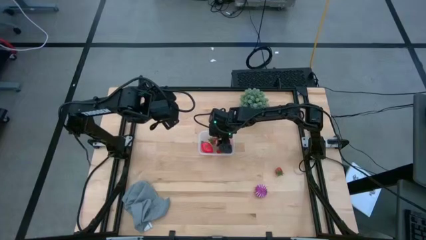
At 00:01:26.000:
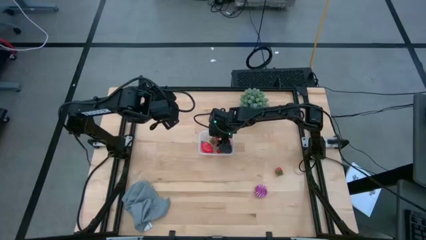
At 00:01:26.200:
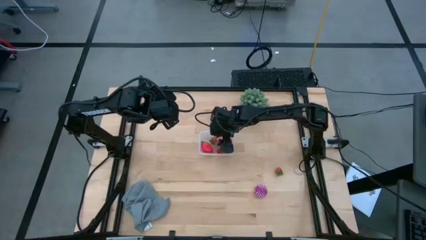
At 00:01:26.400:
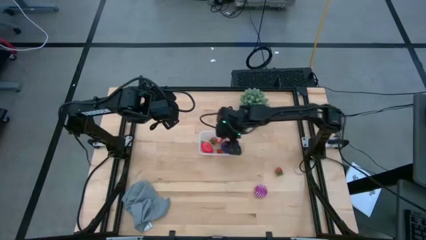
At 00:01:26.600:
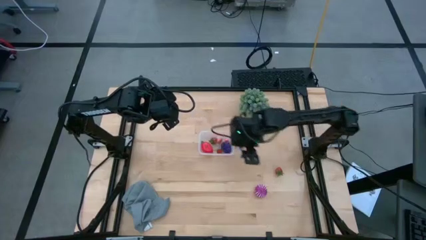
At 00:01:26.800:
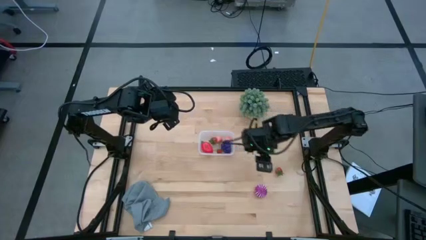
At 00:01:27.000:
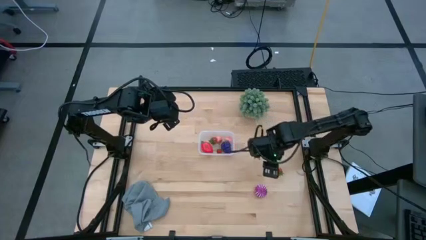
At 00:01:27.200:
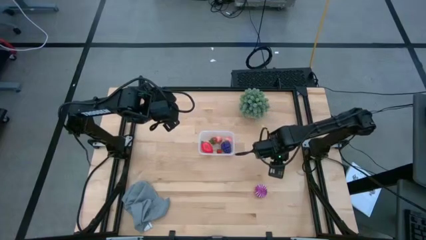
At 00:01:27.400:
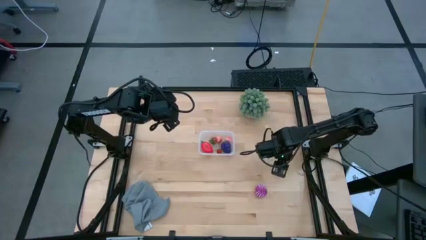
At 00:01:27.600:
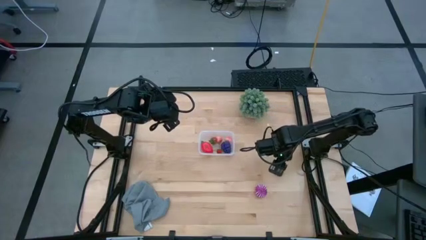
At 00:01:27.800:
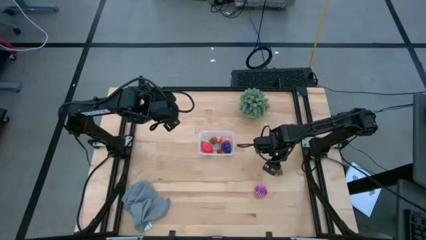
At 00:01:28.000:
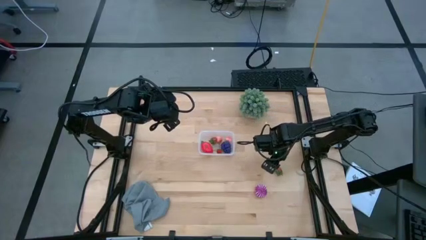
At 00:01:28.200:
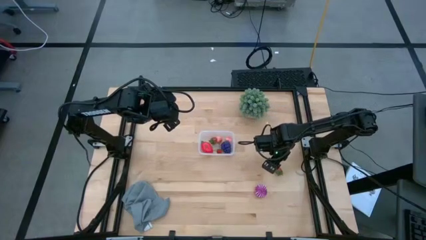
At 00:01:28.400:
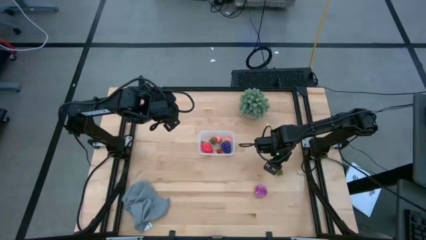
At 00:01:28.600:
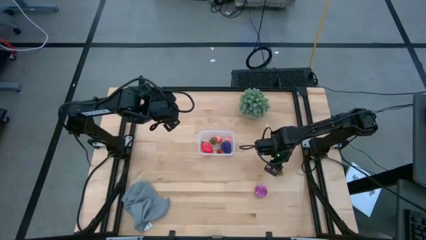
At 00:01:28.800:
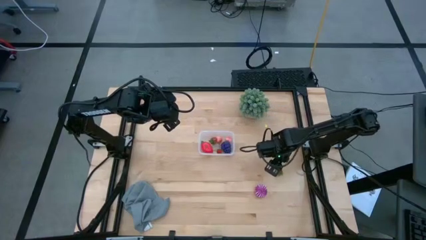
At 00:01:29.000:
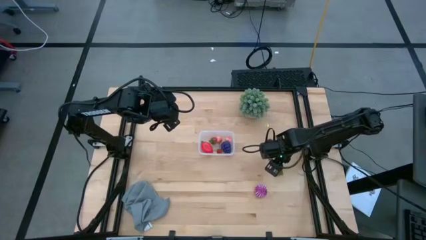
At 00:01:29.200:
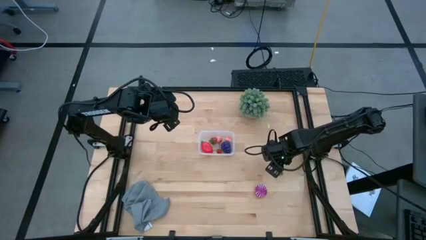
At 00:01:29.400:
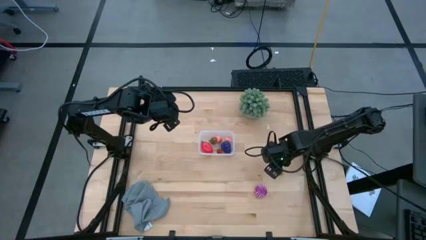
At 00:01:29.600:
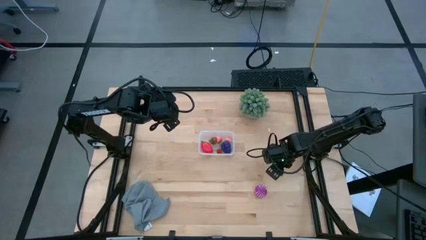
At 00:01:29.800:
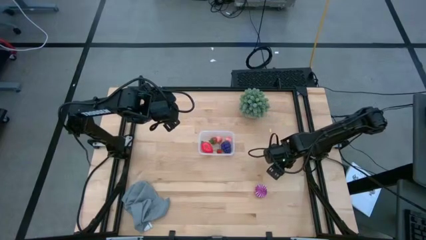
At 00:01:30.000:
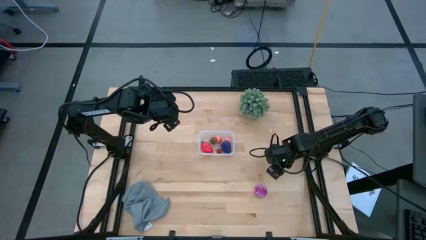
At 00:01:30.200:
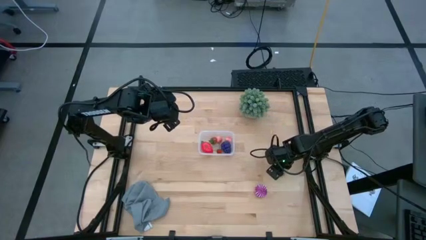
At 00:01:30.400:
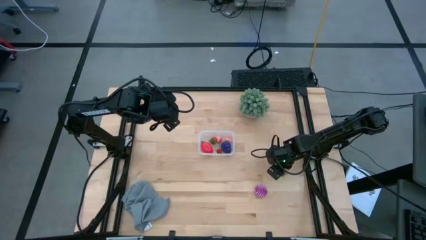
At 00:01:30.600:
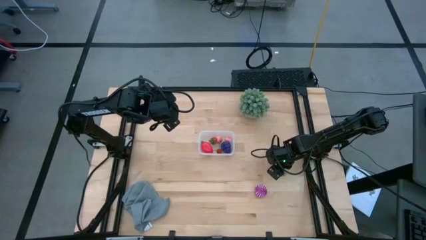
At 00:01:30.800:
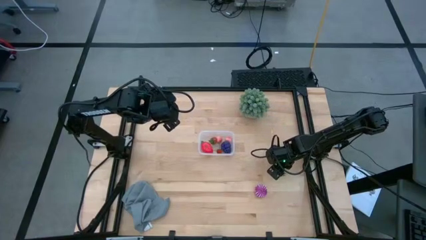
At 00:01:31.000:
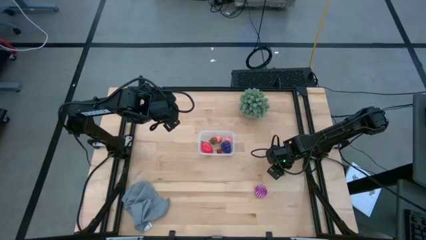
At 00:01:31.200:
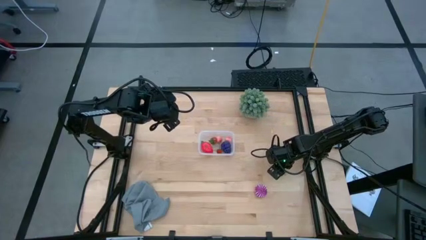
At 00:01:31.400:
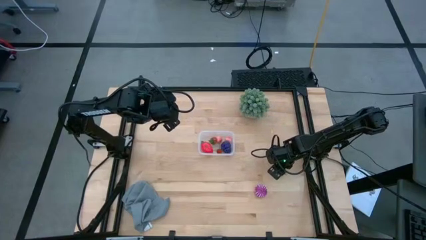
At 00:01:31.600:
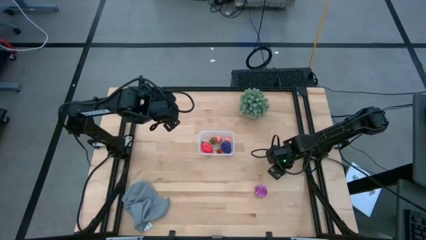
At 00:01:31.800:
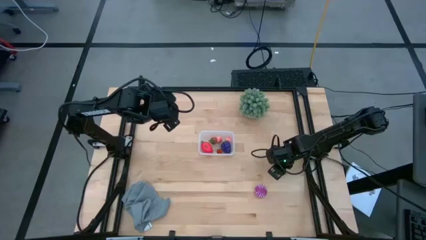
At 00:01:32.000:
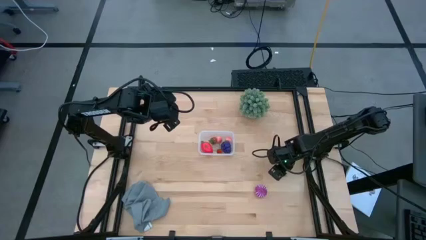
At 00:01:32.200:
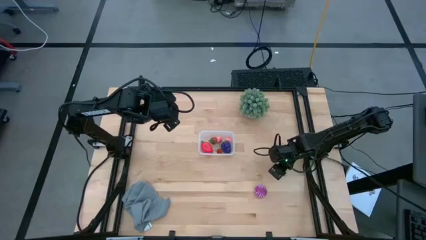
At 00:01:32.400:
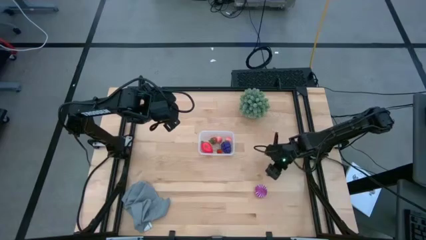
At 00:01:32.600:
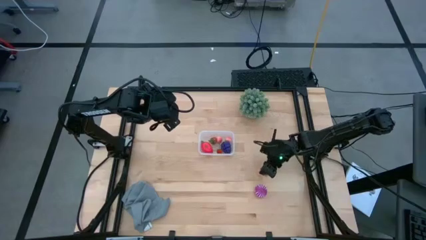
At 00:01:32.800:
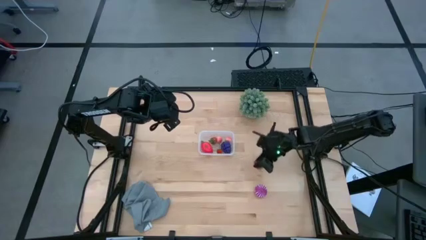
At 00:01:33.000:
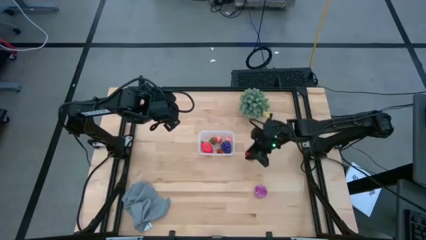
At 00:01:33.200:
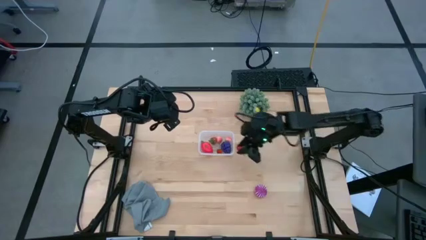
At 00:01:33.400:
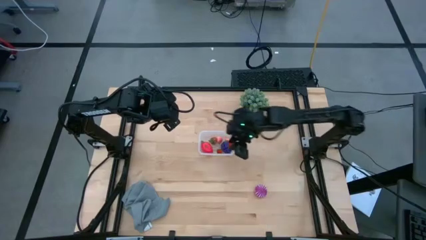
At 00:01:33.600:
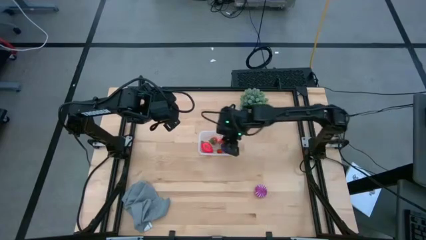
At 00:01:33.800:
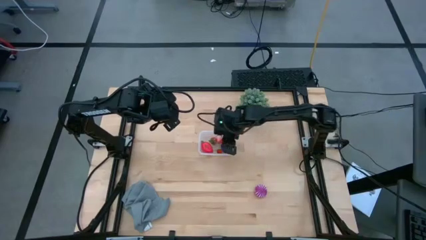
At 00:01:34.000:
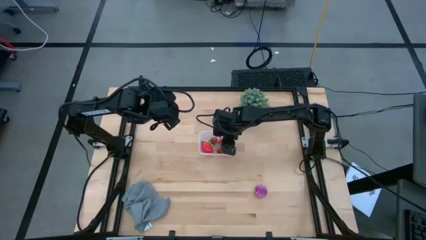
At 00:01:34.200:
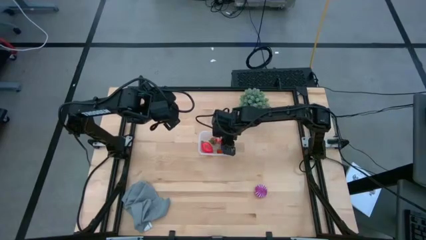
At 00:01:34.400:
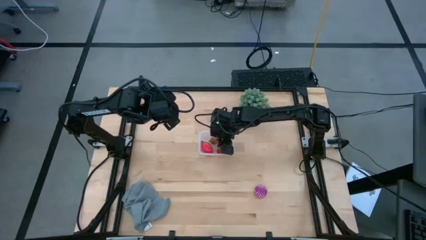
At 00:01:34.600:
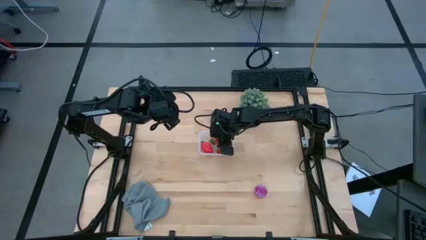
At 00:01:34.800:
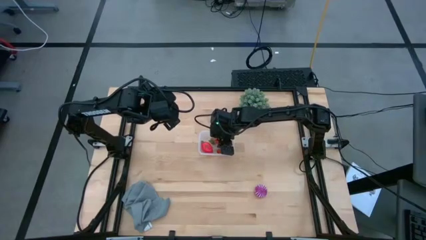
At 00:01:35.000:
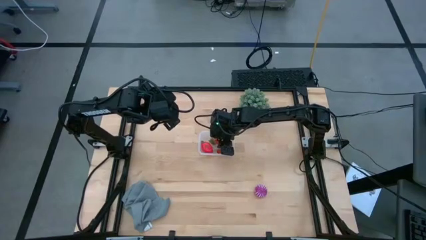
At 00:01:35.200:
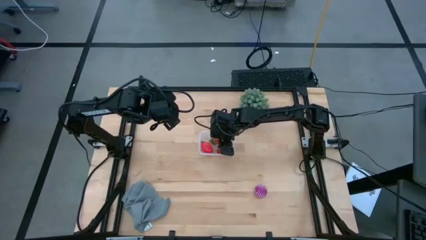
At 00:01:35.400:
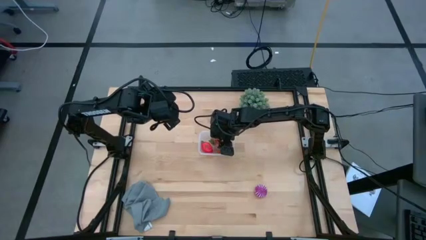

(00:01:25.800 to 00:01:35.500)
Task: Pick and placing Produce into tupperware
Put the red strawberry into the transparent bin

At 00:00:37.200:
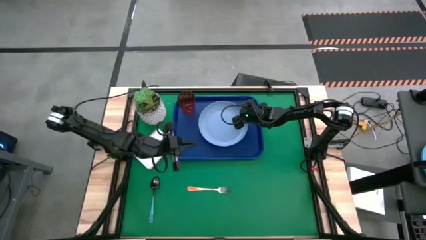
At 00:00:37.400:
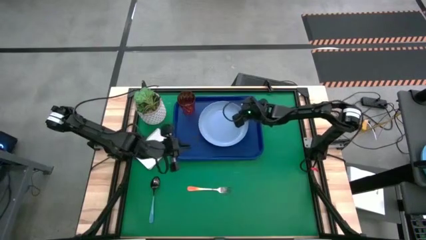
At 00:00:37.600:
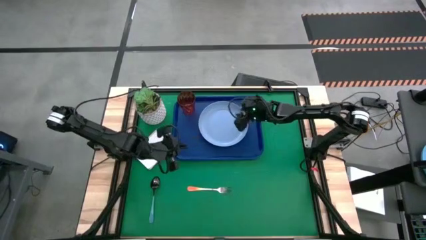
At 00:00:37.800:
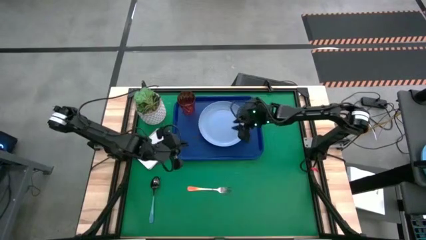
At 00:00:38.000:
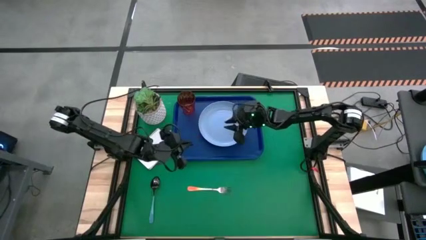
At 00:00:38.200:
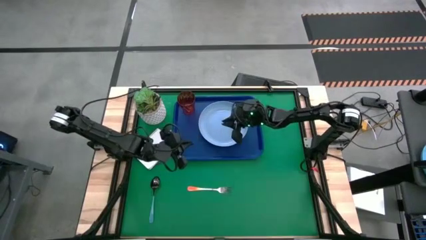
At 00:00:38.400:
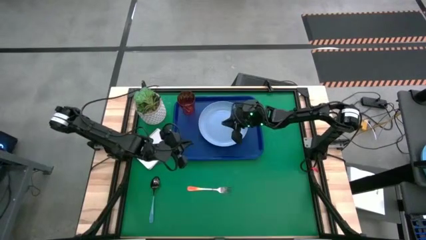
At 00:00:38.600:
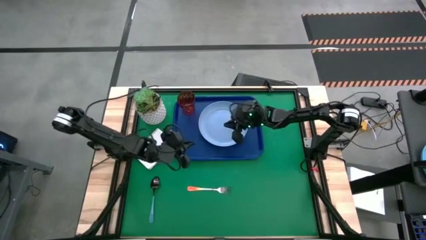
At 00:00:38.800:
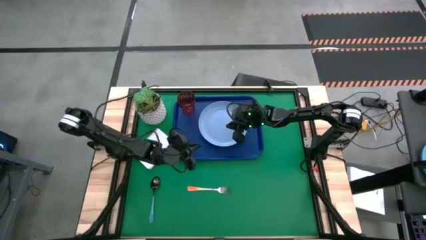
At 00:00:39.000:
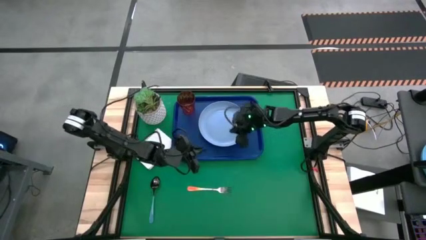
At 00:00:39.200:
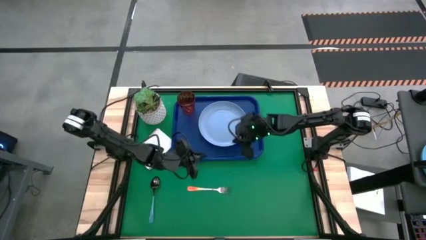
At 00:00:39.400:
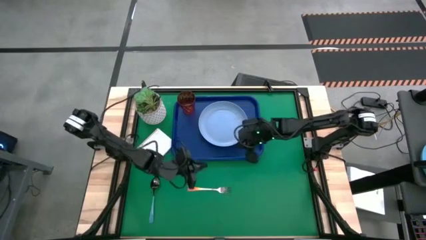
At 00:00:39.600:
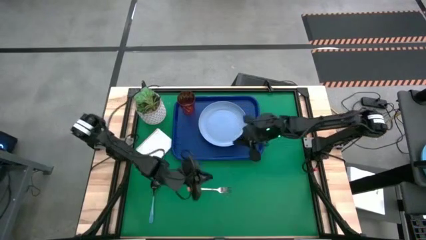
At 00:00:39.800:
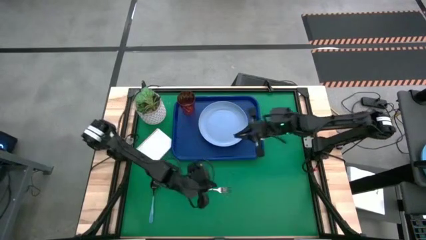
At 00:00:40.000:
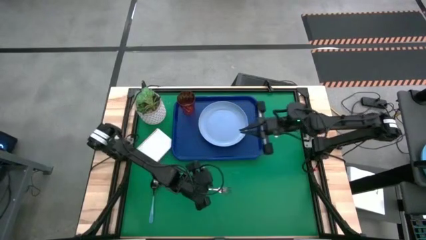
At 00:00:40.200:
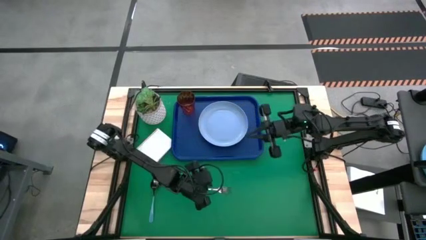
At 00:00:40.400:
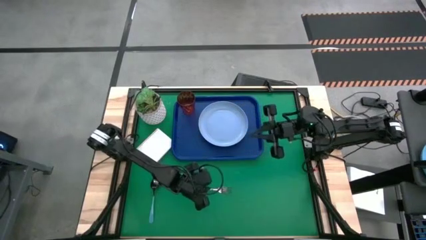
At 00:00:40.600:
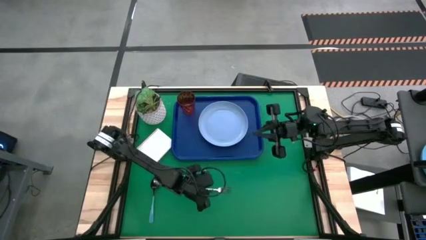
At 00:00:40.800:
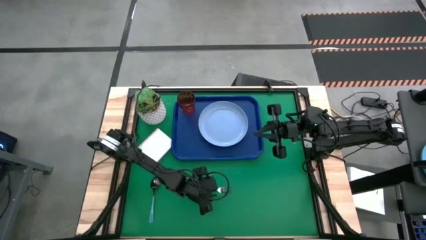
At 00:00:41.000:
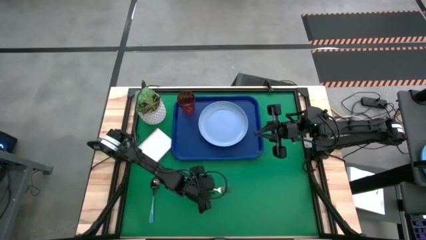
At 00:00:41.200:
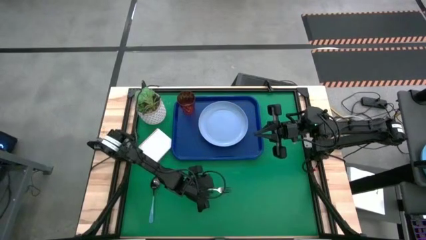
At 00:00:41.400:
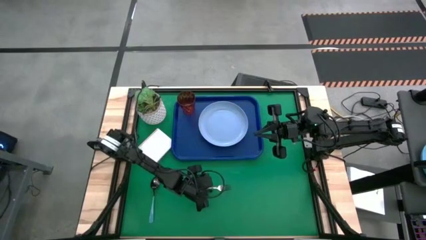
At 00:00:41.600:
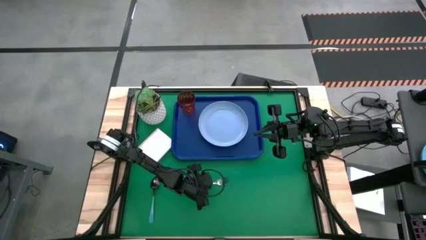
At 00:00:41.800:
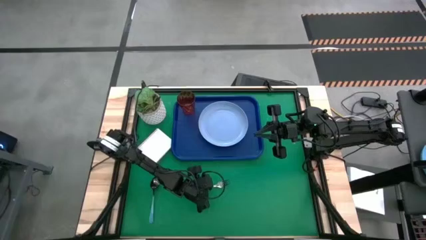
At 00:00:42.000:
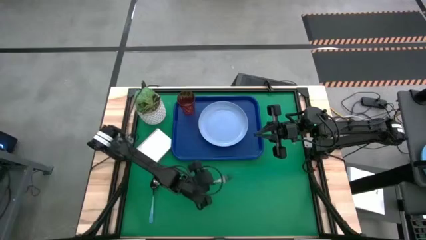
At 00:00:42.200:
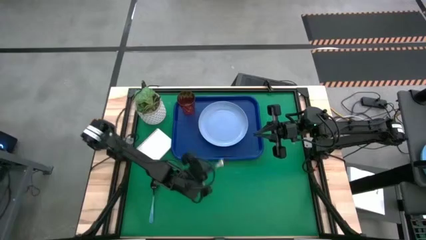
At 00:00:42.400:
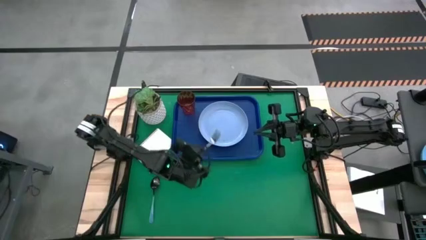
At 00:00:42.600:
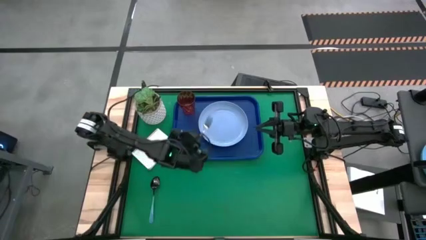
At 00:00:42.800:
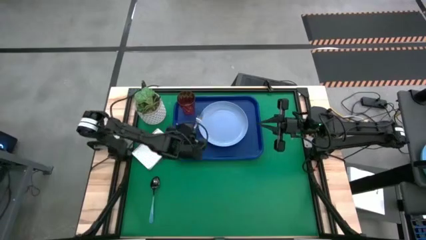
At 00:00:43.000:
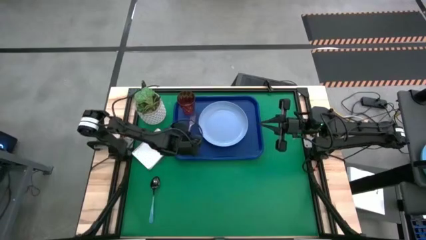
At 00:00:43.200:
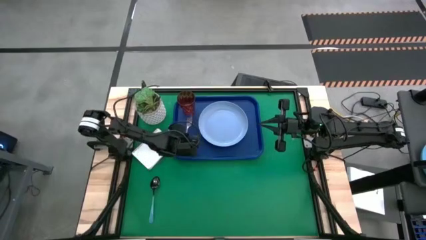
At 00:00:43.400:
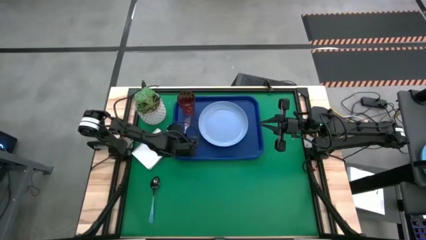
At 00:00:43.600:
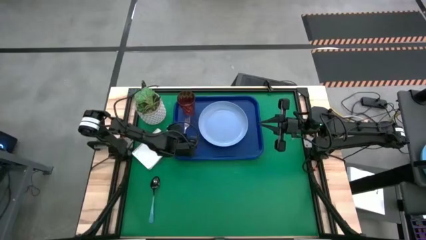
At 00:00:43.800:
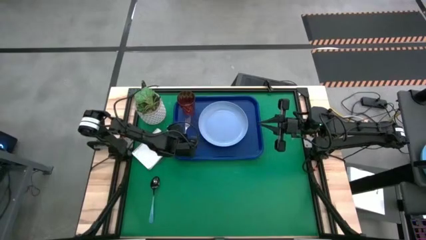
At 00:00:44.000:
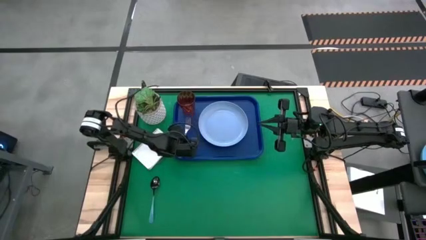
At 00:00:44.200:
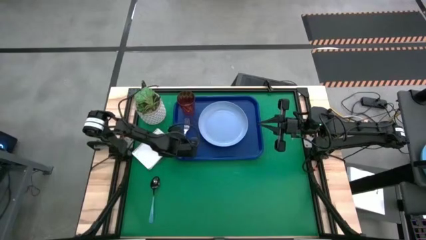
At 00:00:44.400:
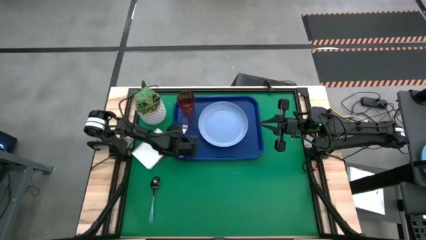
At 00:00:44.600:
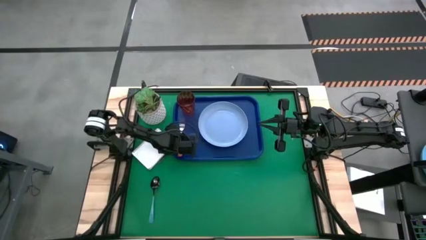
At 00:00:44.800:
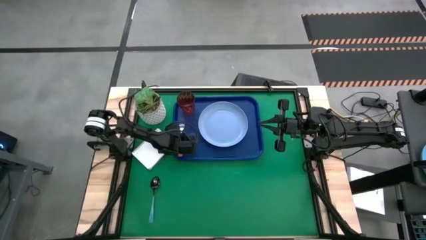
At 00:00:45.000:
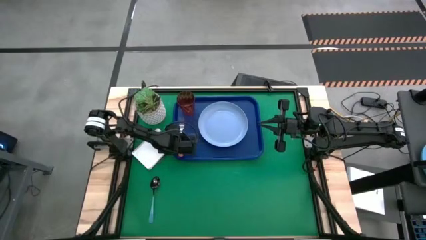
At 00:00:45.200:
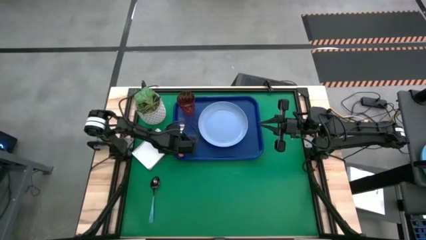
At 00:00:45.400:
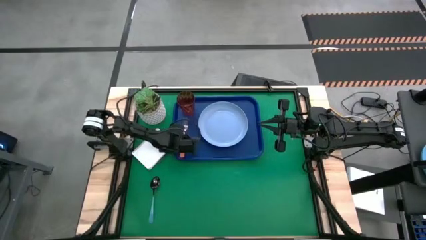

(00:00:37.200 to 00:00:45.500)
Task: Pick and place plate/cup/fork/spoon on tray
Put the orange fork on the blue tray to the left of blue plate
